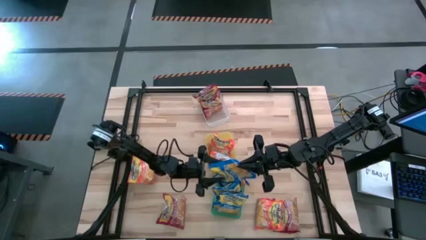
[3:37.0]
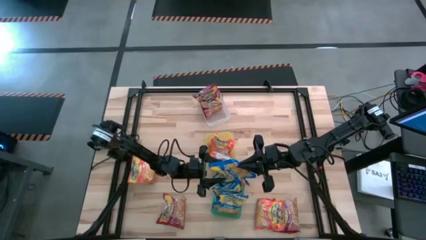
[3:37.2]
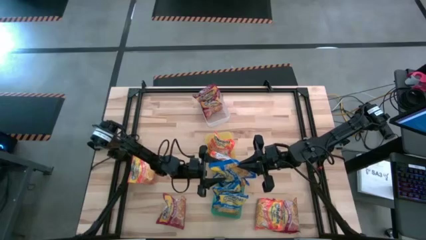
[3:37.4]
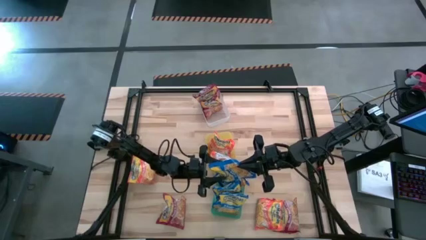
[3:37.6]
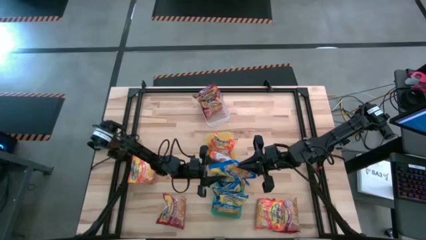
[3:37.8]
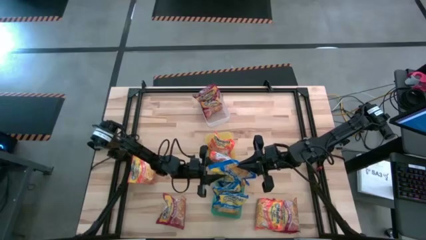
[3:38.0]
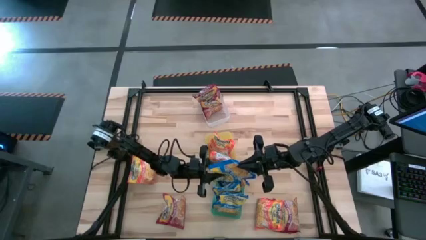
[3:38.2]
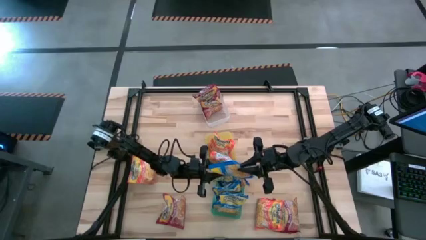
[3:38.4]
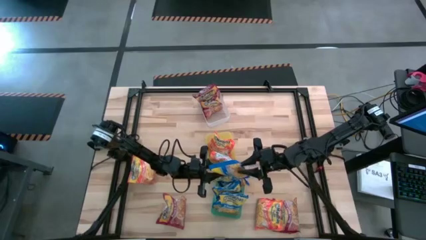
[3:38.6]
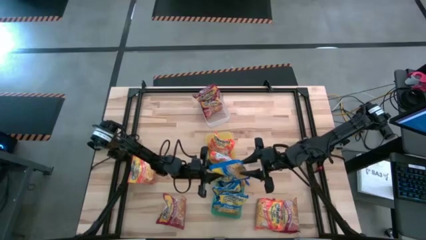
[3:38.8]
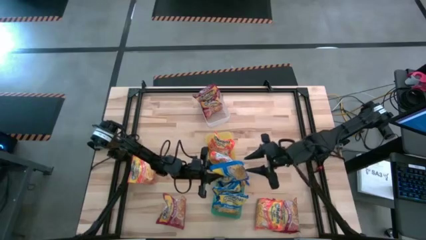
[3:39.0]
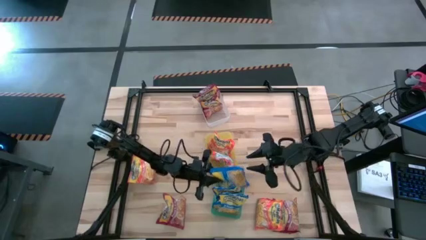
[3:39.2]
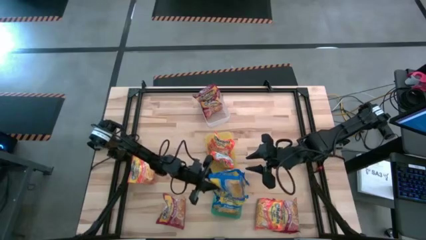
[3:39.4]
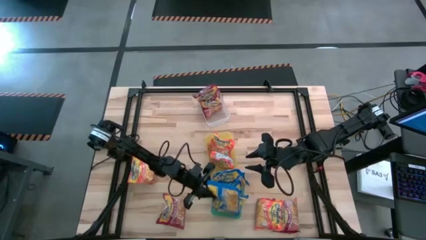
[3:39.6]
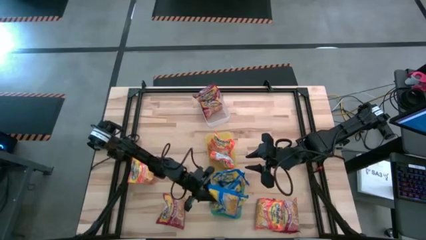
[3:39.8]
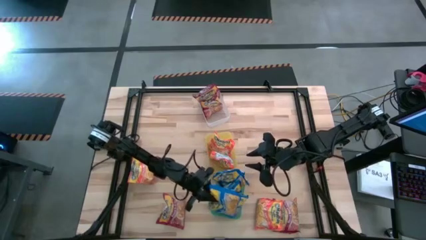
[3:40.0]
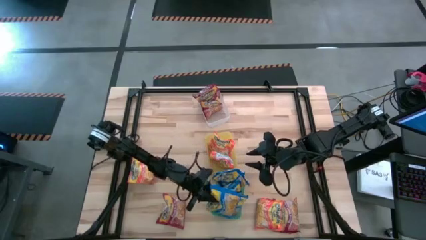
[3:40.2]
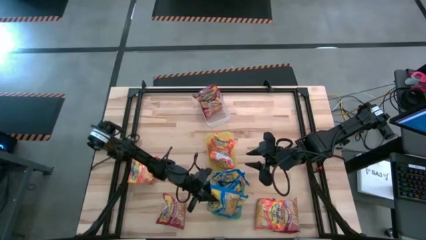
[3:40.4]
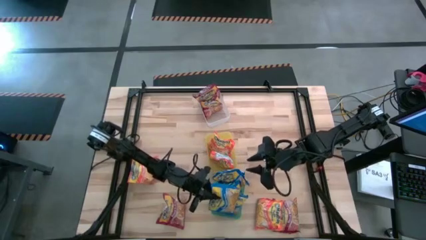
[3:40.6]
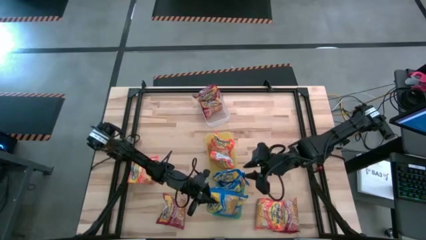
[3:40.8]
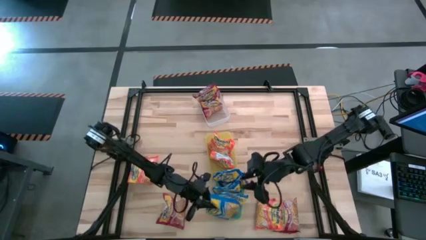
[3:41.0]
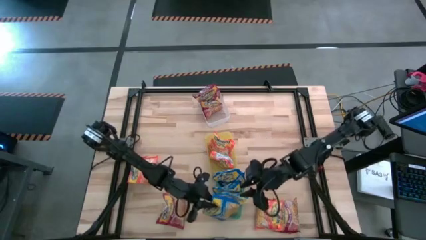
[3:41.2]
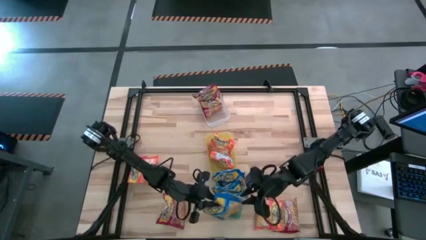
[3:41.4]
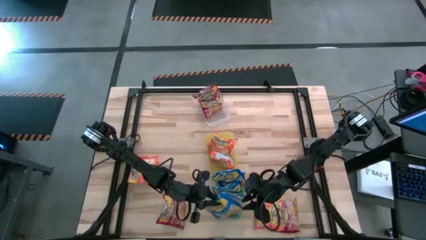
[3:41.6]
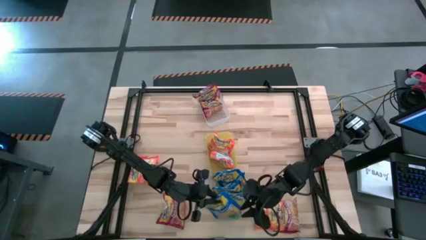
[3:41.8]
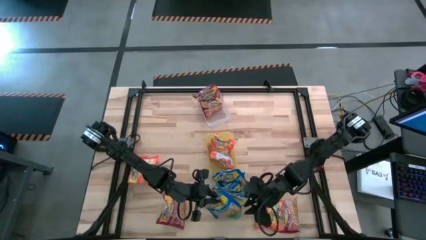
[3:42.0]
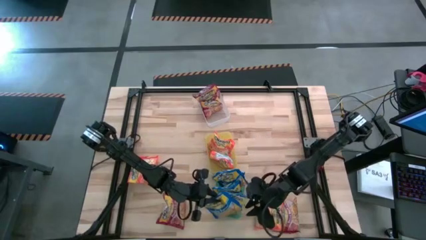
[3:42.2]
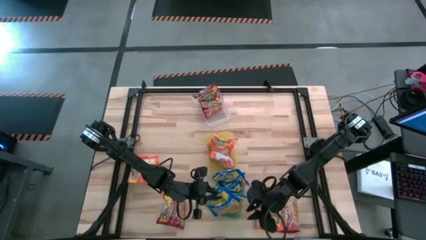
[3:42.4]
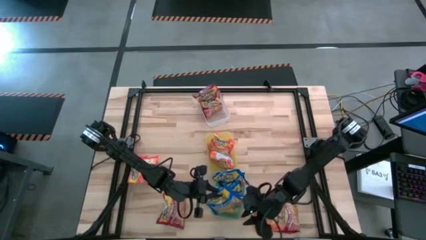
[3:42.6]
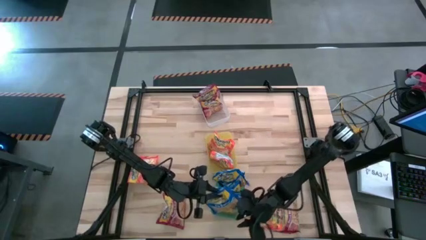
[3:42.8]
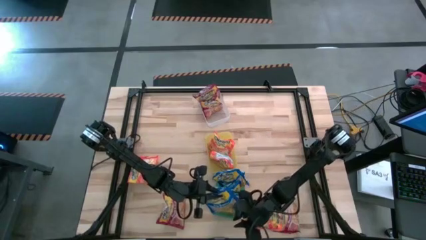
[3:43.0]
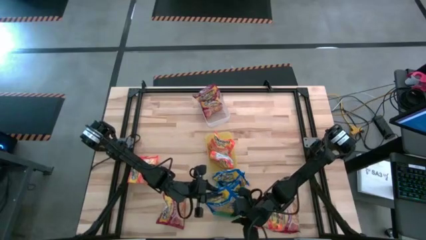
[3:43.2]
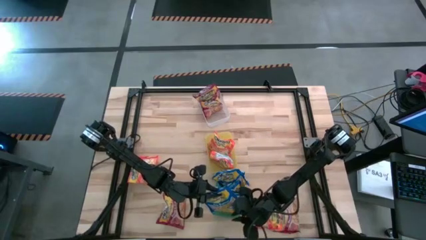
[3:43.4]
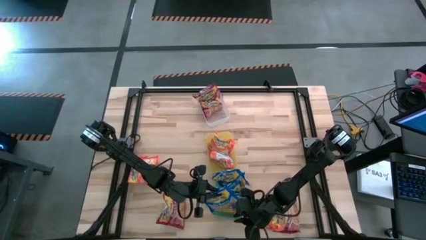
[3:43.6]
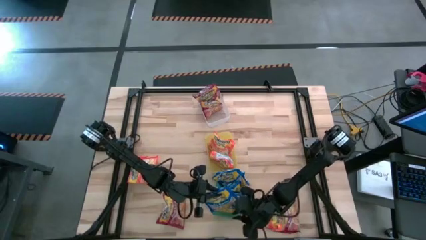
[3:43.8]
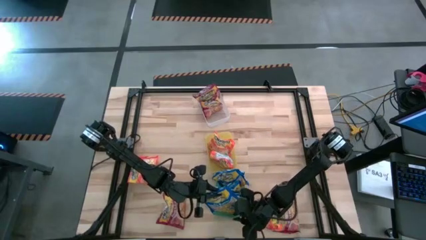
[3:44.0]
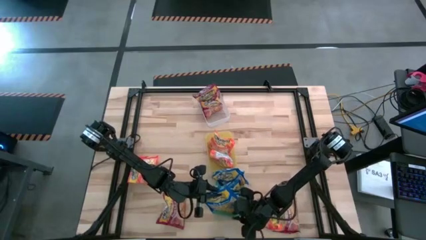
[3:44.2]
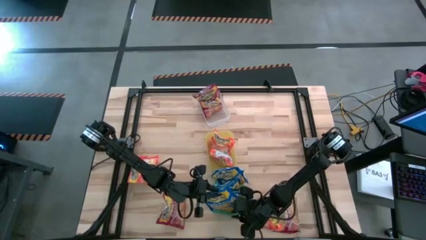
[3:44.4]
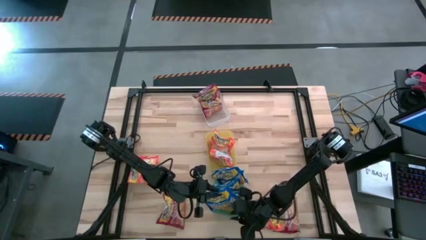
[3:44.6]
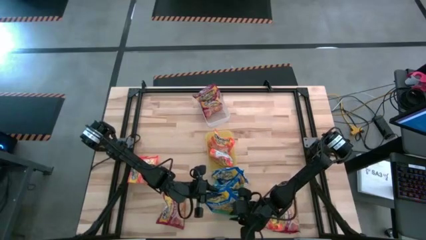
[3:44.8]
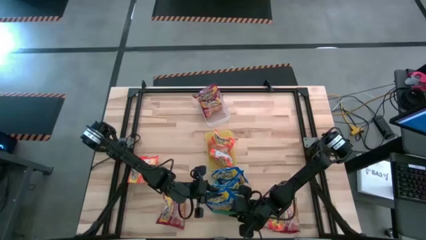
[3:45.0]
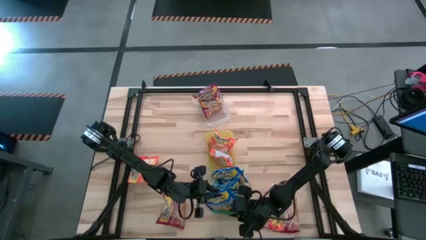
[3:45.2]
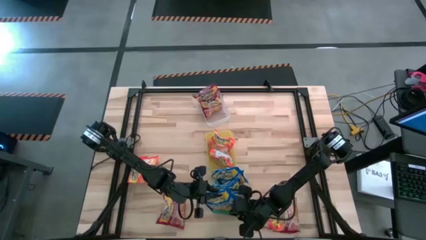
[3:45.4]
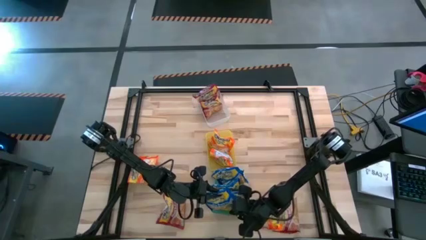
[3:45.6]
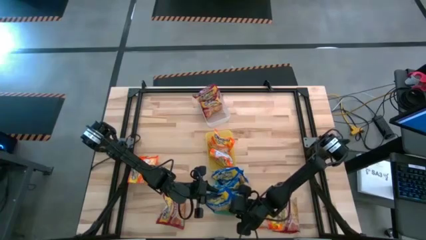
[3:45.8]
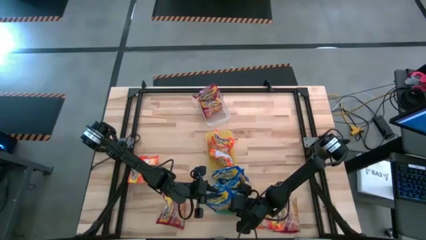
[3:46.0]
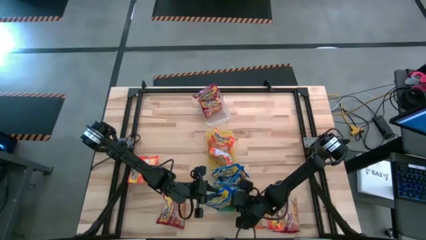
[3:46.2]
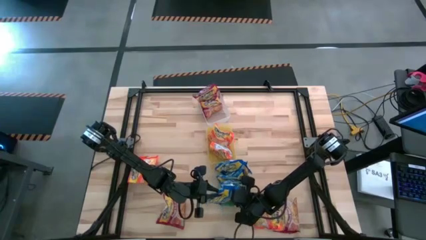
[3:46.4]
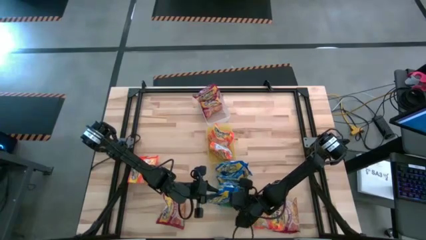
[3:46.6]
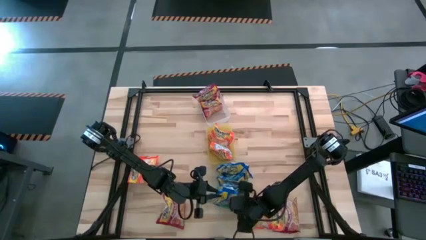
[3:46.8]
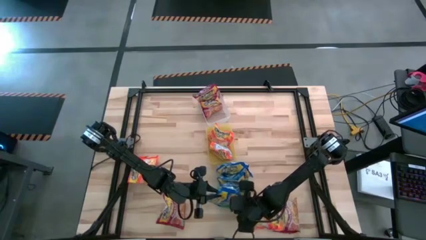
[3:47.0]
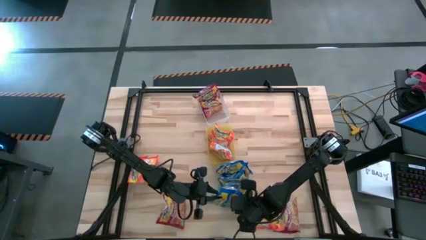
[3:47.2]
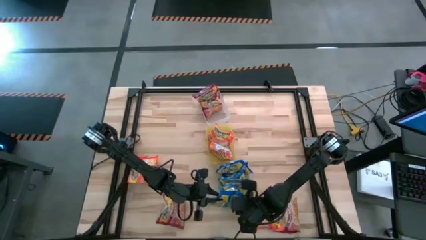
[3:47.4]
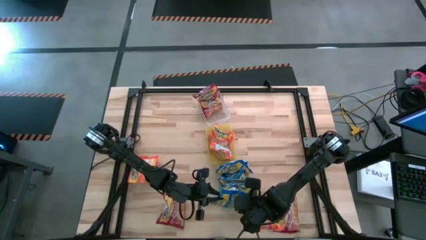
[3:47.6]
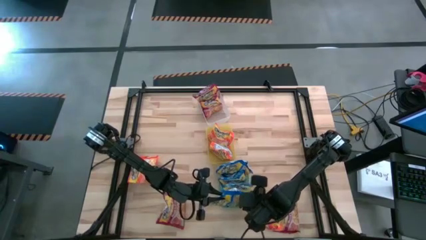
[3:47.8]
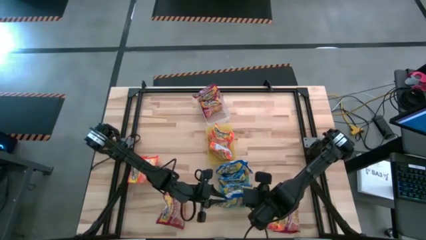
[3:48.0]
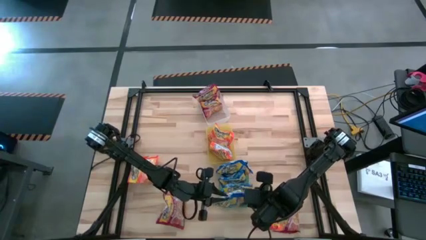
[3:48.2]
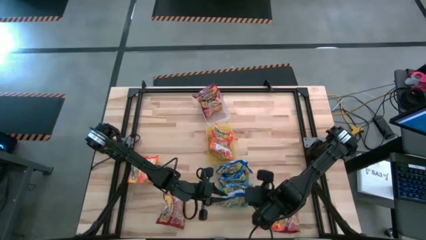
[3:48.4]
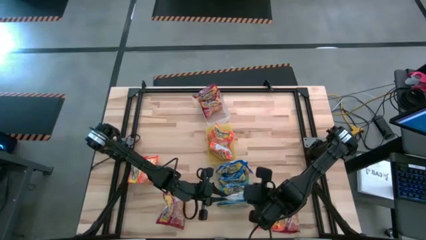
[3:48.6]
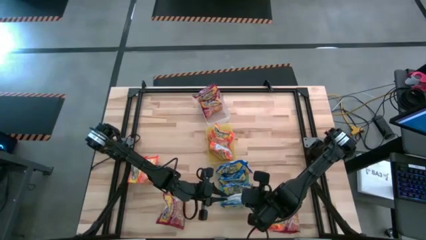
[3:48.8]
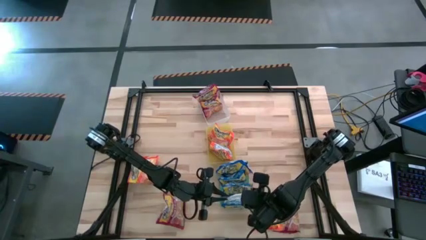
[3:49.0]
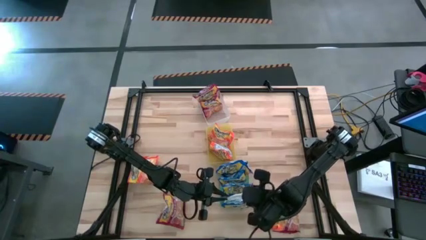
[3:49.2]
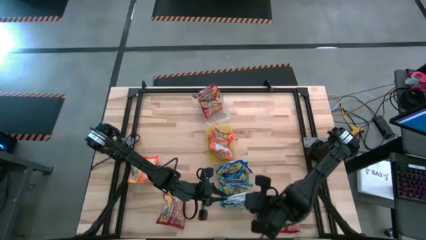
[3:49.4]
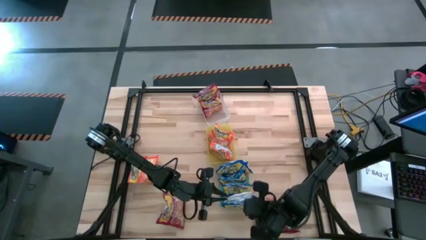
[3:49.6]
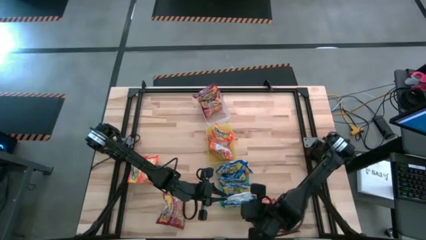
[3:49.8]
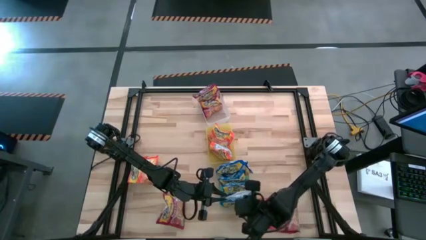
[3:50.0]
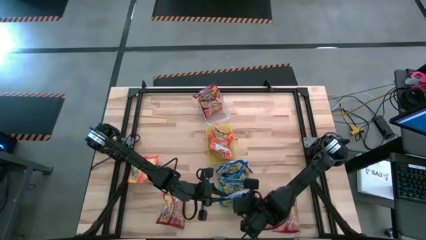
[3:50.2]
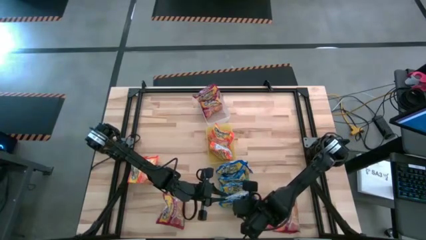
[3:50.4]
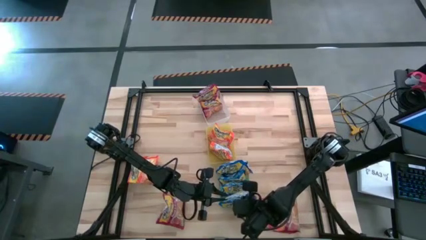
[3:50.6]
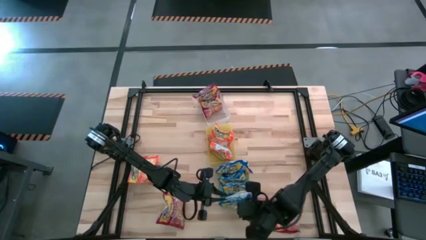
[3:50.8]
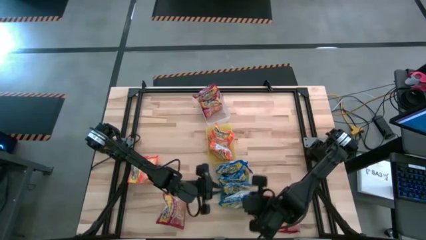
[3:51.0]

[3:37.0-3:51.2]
Task: Sort Maruchan noodles
Put the blue noodle pack into the green bin

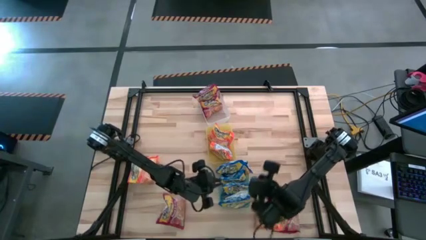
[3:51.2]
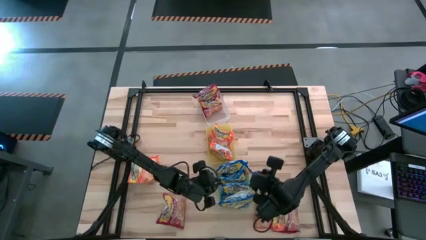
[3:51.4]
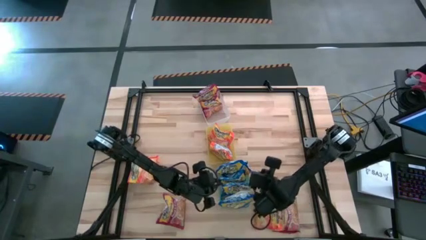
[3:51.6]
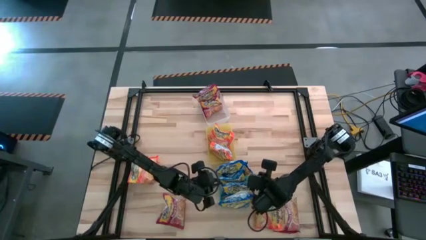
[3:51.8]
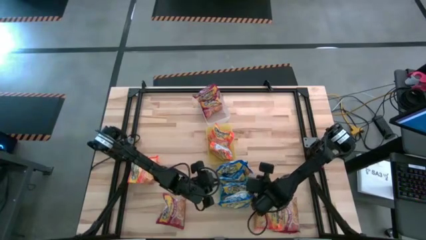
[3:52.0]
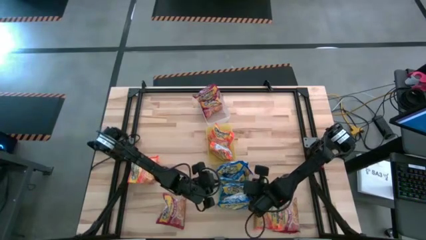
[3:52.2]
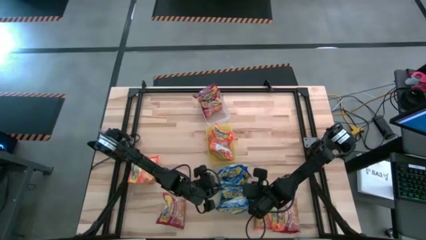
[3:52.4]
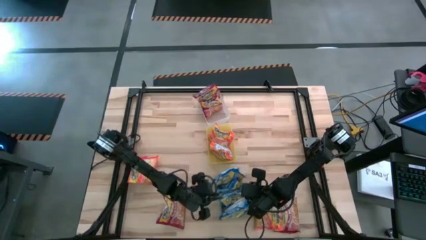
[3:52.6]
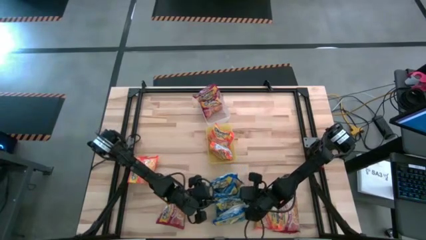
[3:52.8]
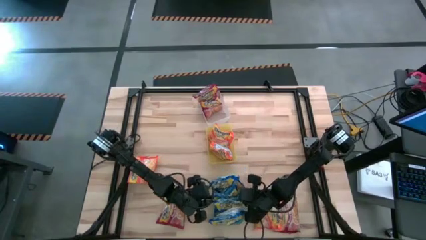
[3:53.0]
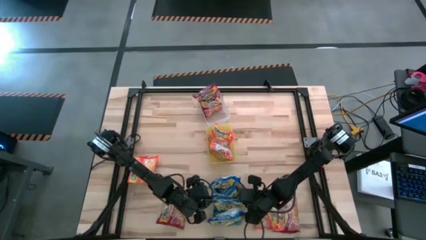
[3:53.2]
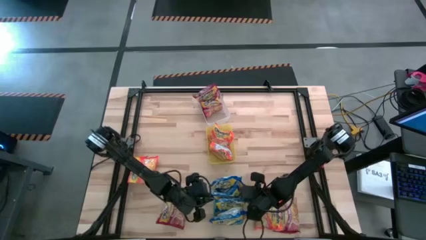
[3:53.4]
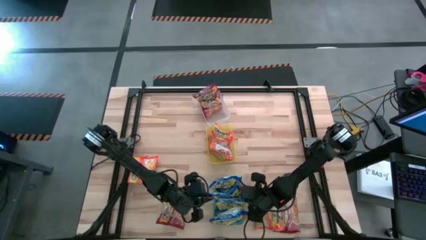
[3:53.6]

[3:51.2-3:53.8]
Adjust the green bin
